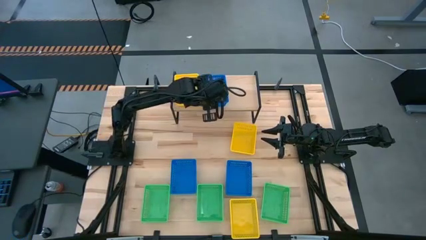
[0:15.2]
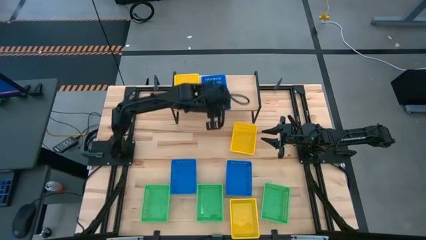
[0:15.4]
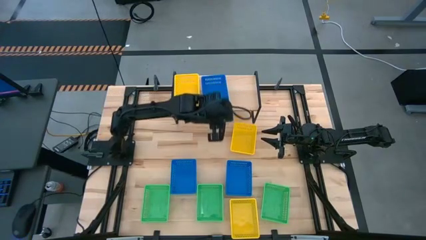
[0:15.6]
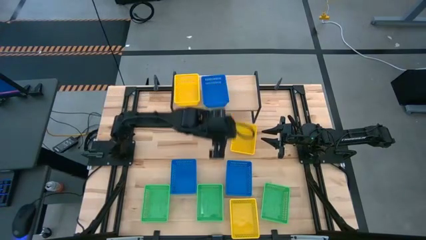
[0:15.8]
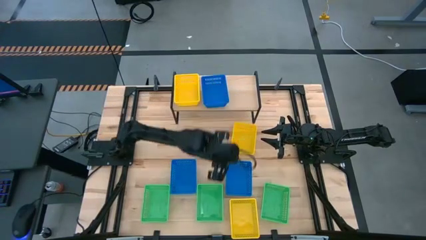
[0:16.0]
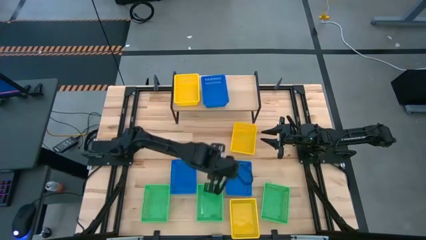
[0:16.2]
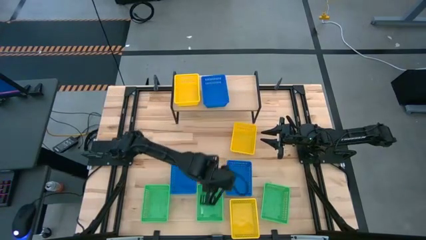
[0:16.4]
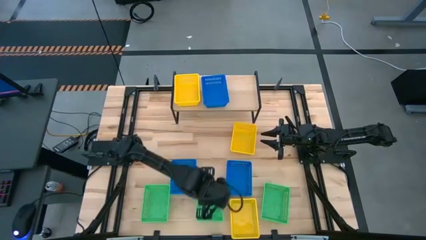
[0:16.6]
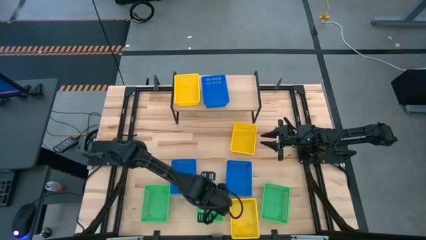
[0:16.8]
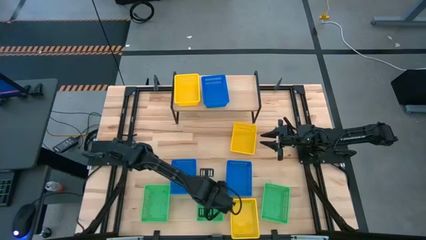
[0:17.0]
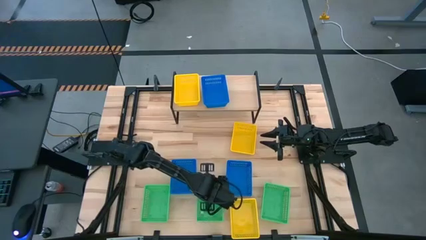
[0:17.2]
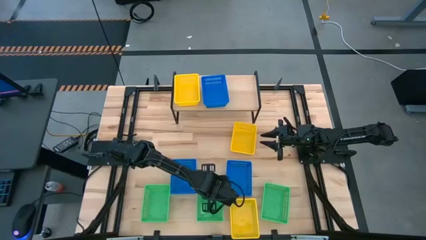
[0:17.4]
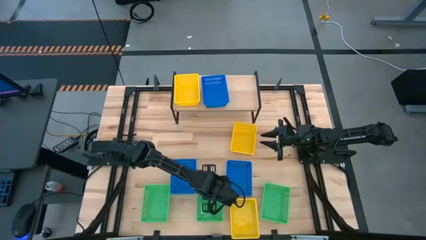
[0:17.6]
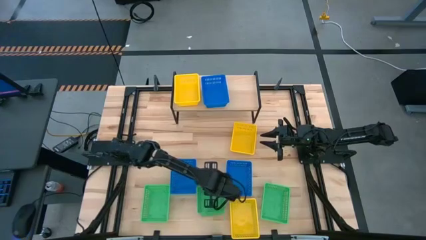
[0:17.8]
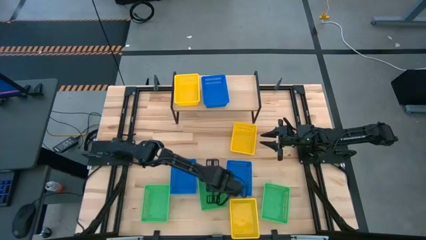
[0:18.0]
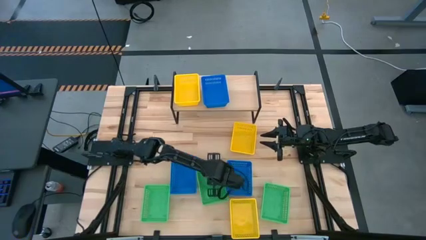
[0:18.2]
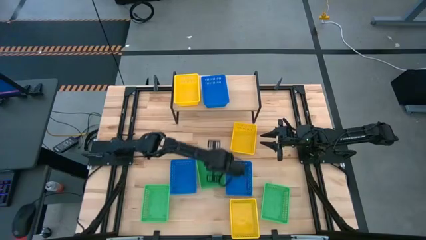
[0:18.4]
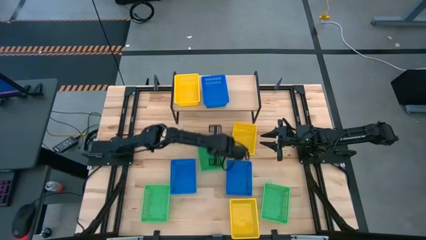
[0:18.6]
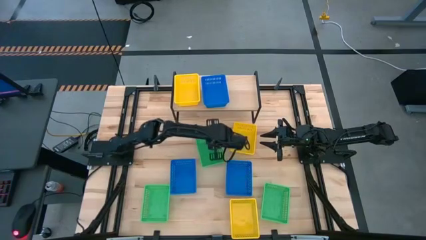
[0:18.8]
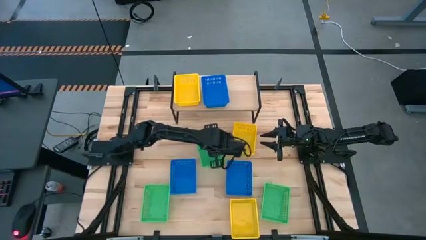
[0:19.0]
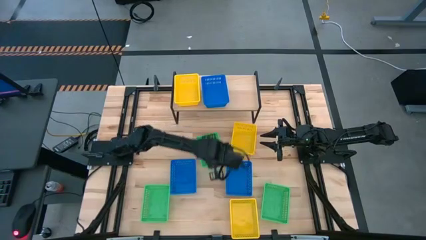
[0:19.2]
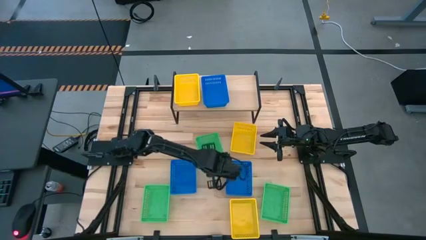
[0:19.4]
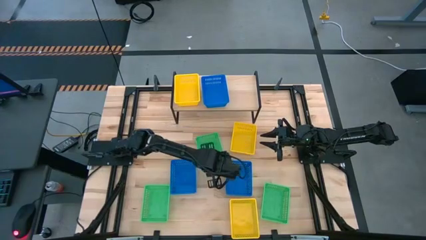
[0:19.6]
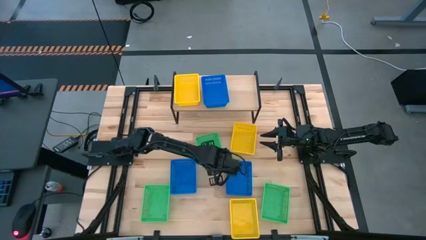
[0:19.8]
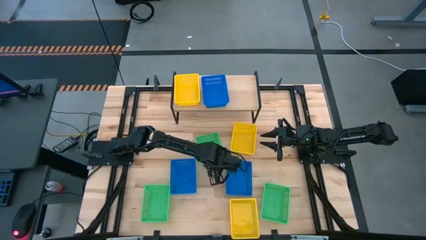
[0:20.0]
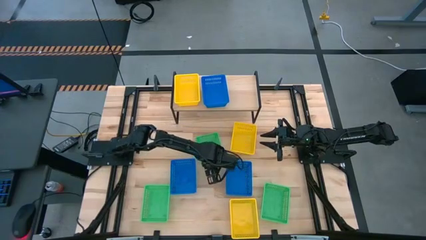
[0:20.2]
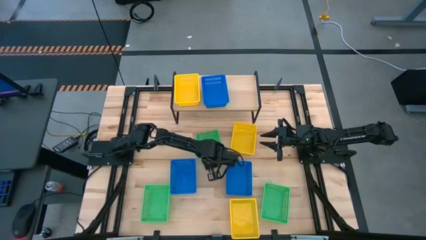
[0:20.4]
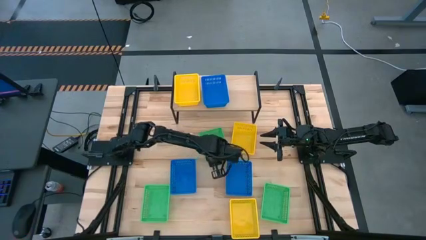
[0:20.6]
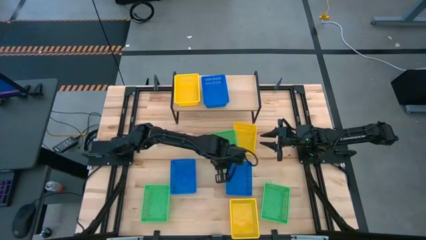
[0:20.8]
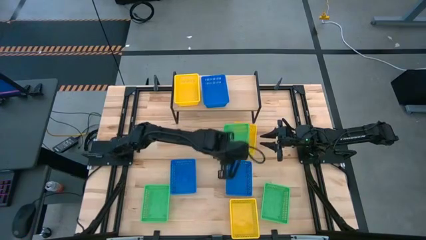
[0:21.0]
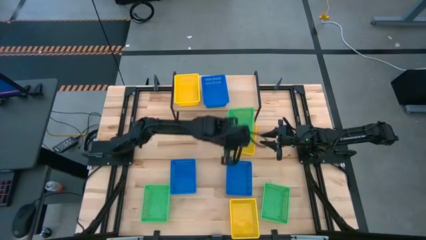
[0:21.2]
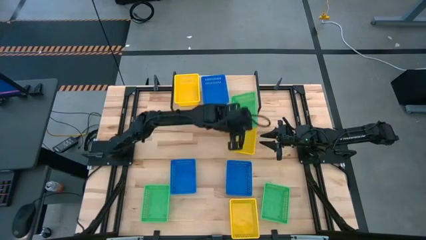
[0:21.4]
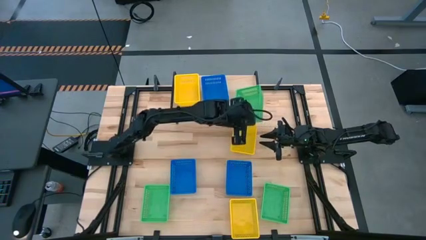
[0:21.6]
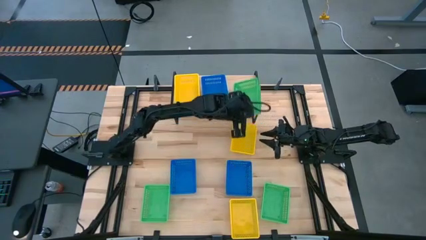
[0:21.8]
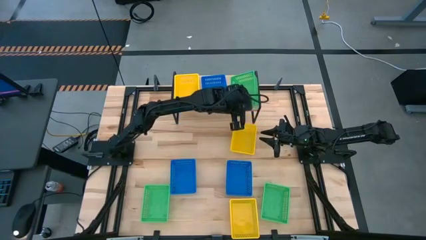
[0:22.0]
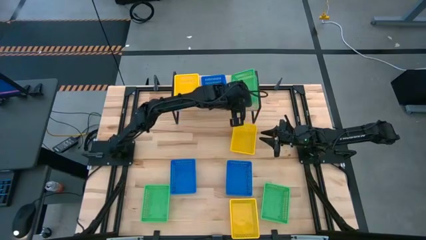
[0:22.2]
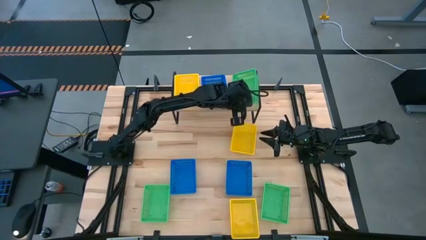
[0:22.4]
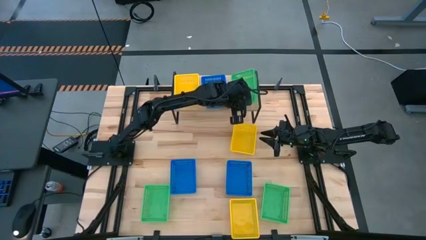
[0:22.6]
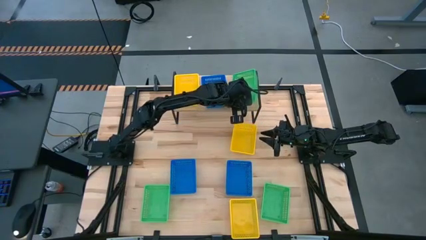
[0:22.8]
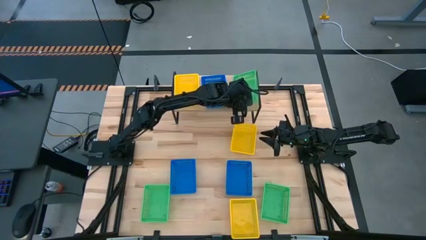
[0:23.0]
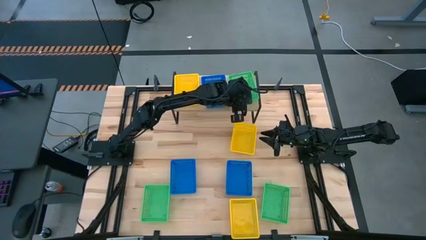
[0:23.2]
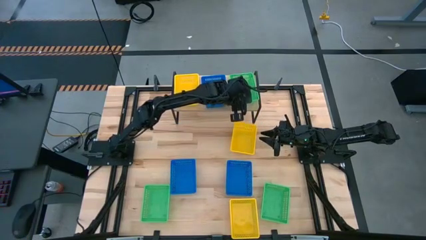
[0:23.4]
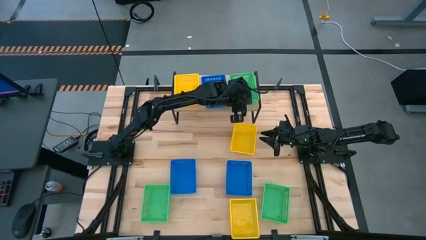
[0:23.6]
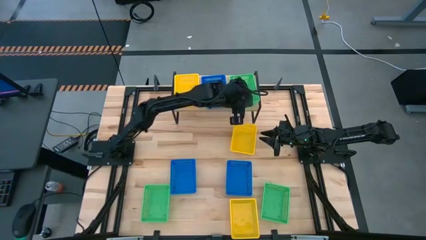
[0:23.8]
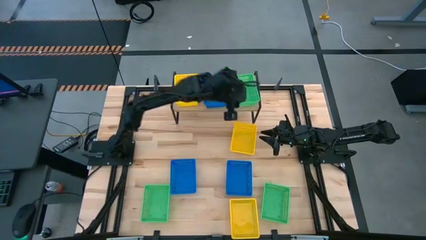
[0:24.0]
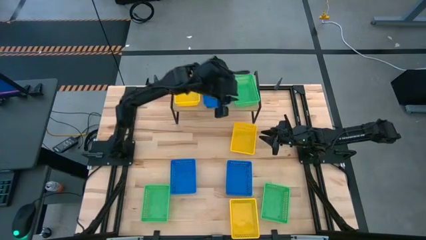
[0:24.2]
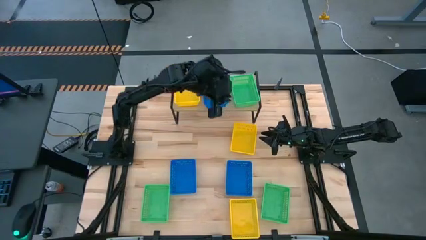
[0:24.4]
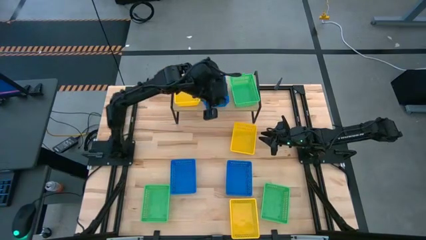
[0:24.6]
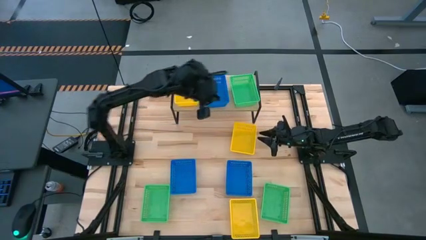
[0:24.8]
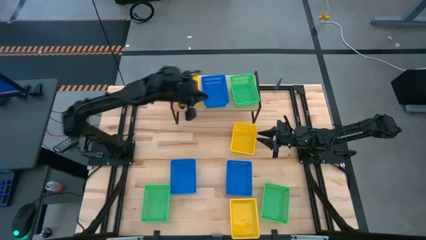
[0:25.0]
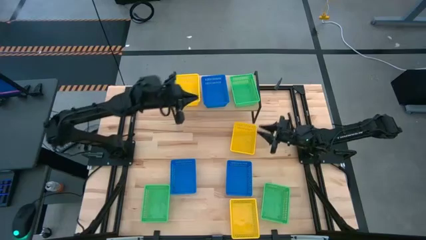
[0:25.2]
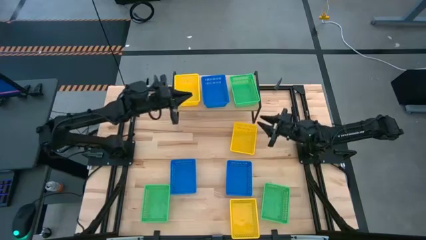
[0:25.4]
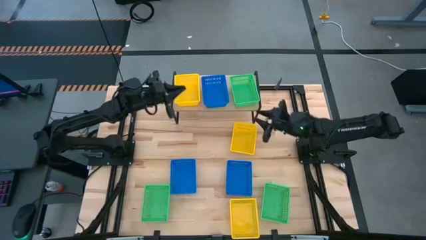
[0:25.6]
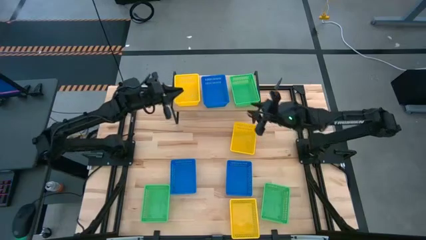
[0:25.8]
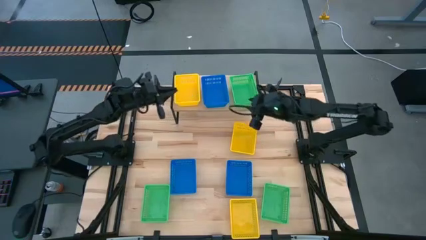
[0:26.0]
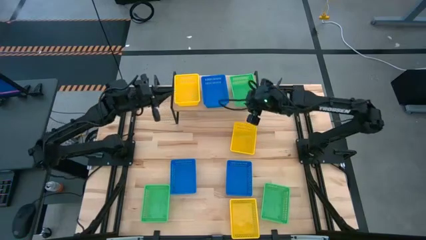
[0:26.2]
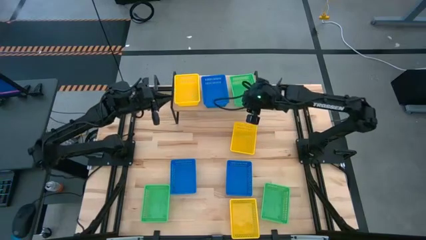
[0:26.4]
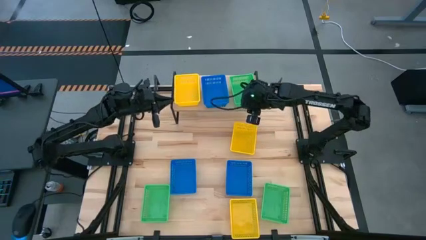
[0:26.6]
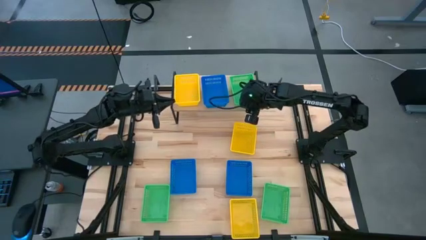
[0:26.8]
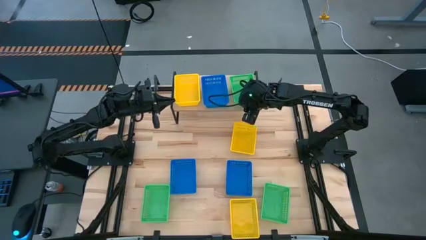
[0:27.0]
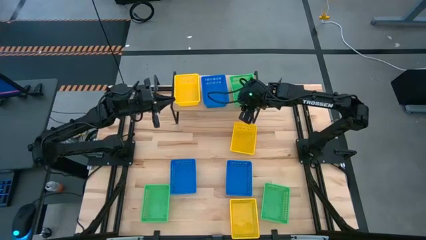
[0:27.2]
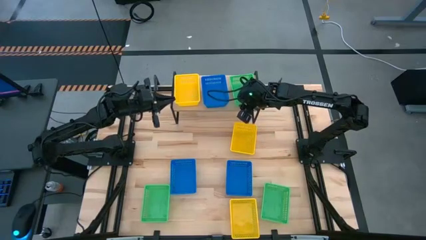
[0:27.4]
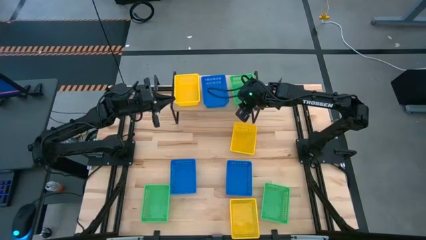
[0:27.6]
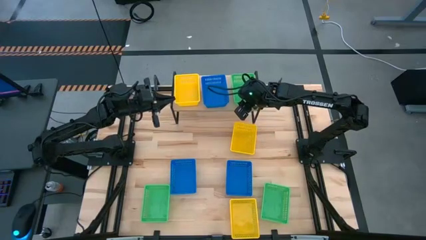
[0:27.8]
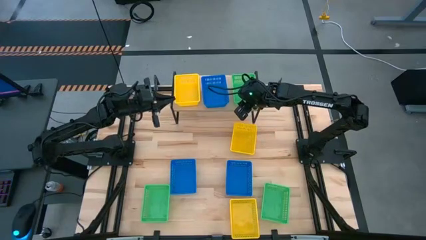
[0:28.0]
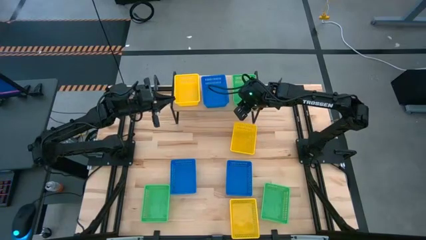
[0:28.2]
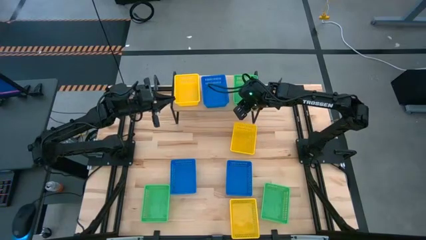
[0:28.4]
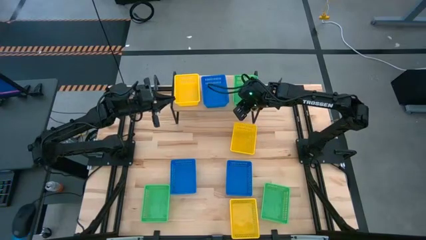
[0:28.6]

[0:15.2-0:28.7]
Task: Stack baskets on shelf by color
Put the middle green basket on the shelf

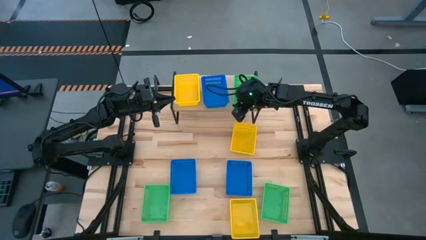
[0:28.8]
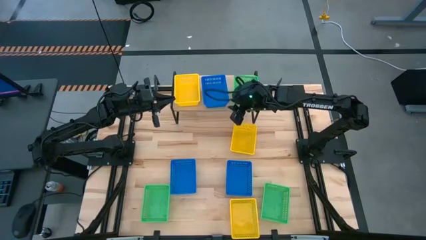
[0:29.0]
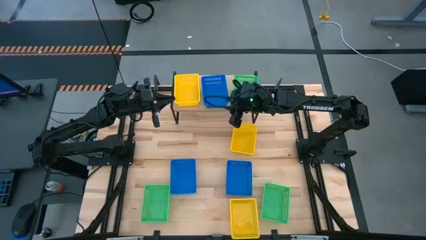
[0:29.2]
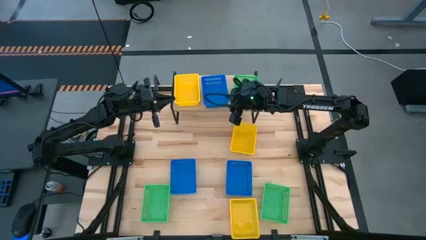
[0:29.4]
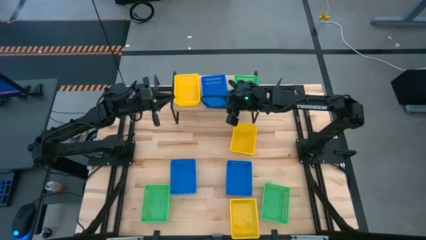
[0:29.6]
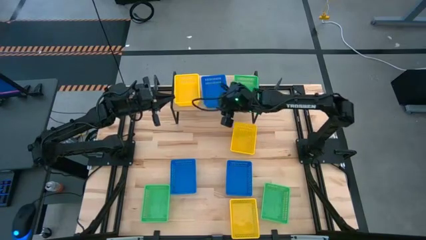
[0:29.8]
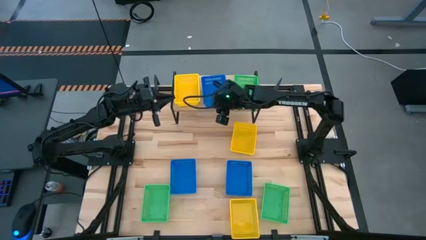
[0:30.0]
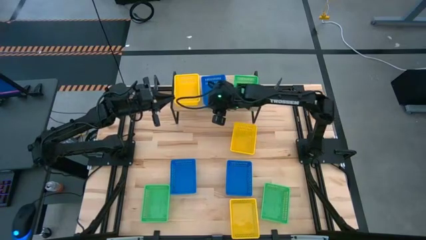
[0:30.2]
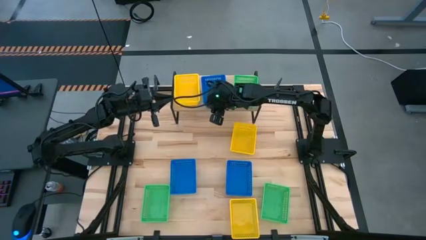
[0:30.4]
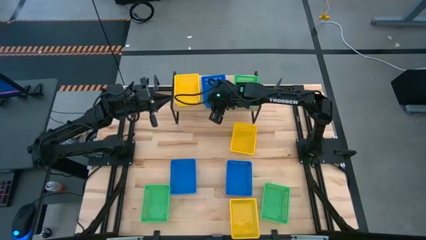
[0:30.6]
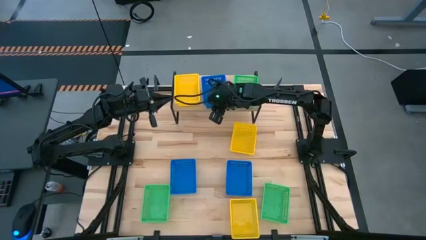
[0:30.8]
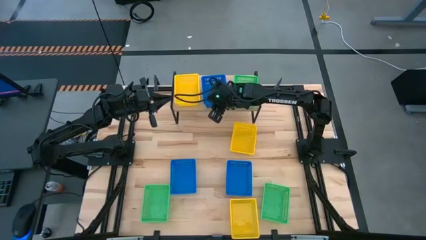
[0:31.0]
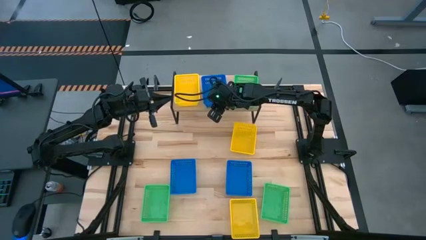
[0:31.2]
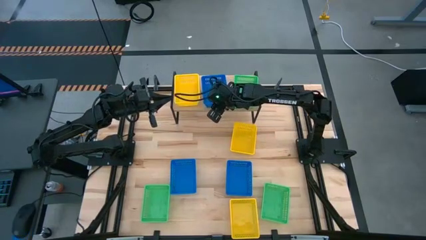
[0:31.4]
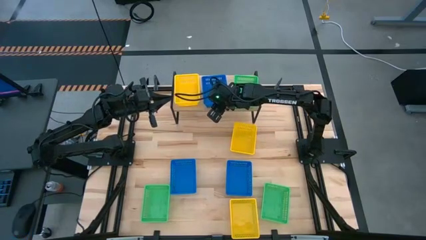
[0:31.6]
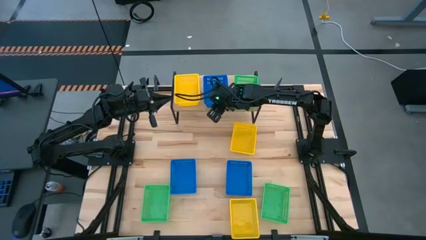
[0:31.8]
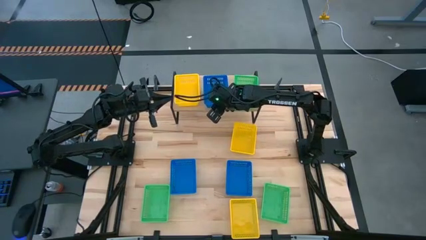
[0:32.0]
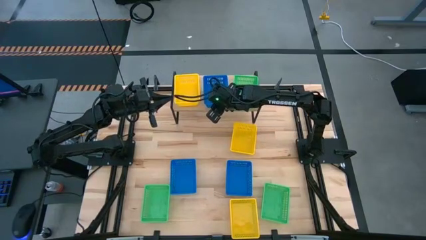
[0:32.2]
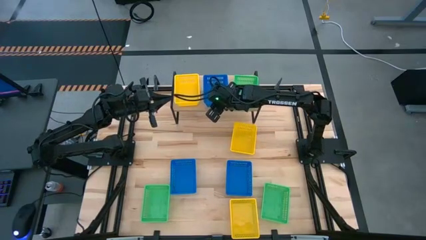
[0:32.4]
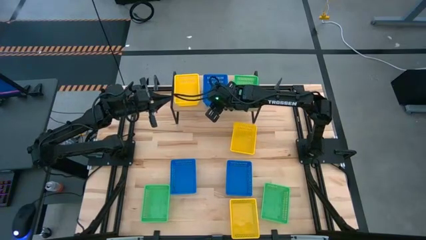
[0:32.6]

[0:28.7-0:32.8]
Adjust the blue basket on the shelf
